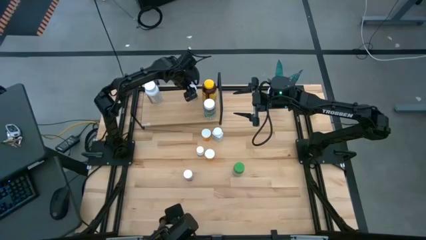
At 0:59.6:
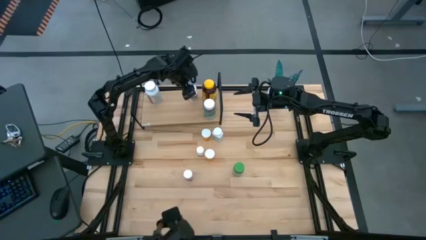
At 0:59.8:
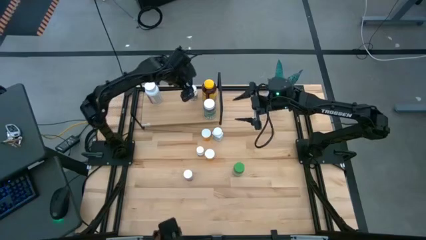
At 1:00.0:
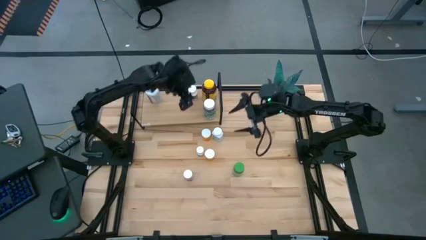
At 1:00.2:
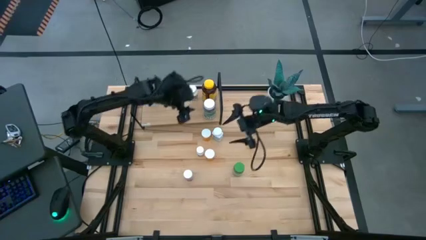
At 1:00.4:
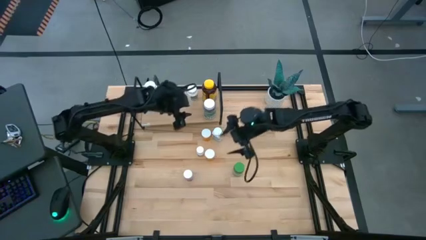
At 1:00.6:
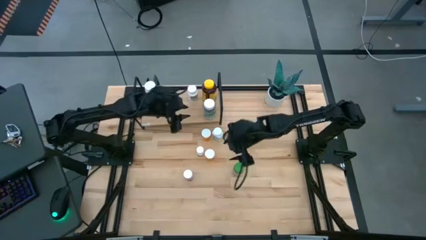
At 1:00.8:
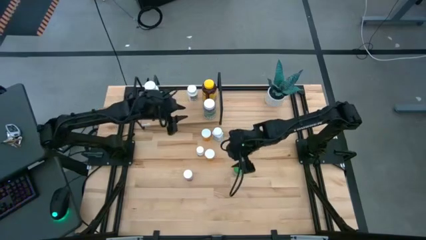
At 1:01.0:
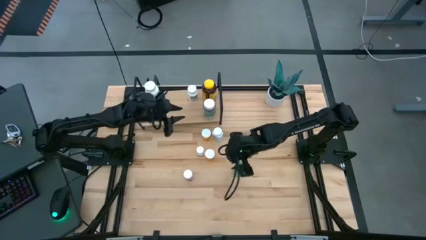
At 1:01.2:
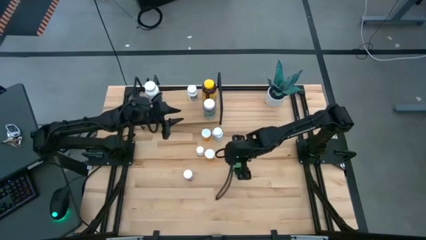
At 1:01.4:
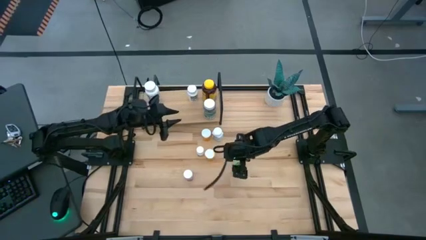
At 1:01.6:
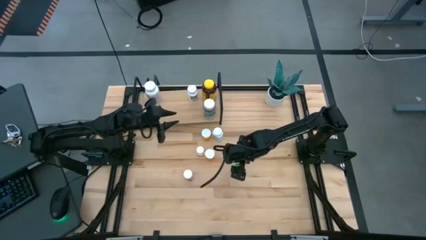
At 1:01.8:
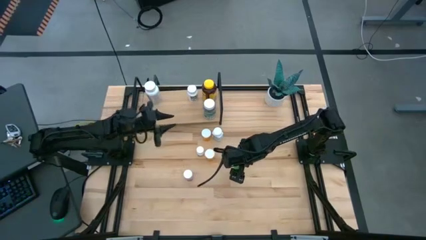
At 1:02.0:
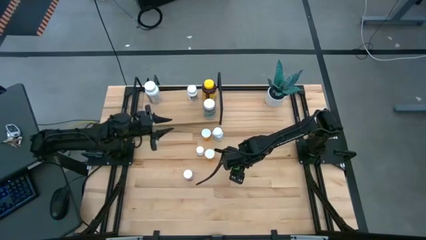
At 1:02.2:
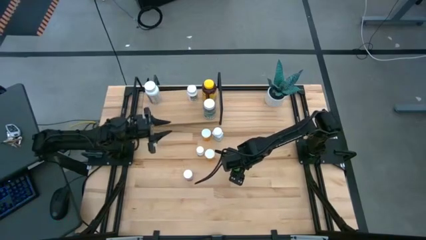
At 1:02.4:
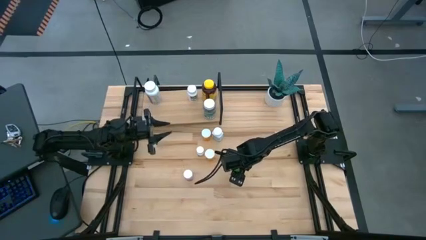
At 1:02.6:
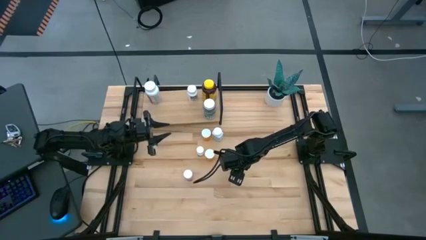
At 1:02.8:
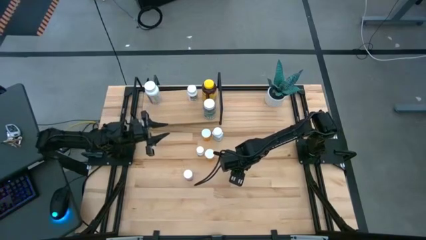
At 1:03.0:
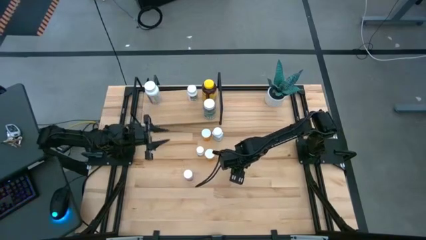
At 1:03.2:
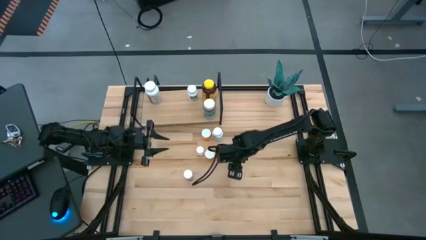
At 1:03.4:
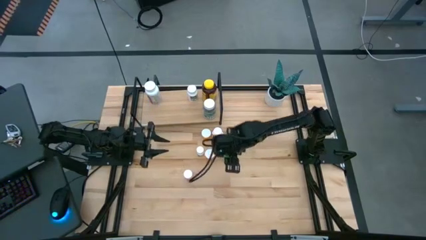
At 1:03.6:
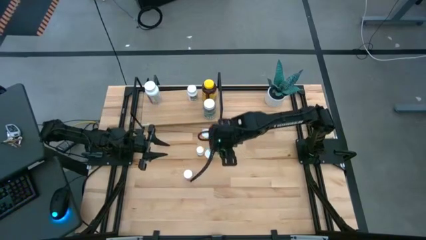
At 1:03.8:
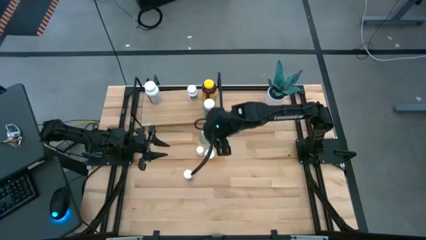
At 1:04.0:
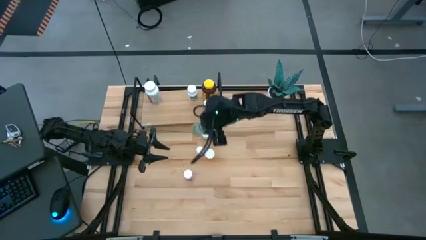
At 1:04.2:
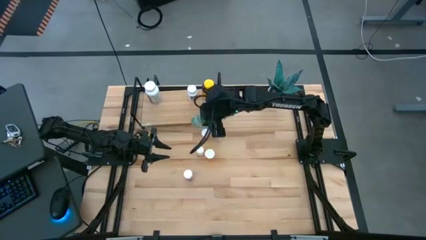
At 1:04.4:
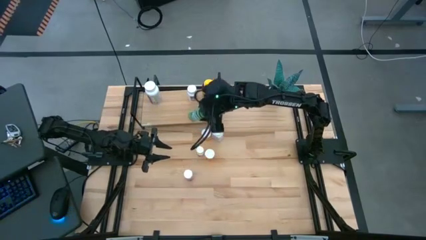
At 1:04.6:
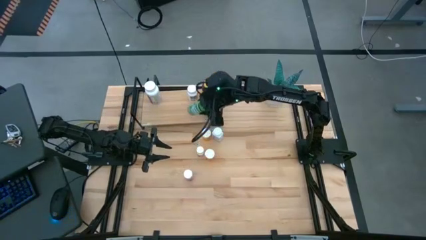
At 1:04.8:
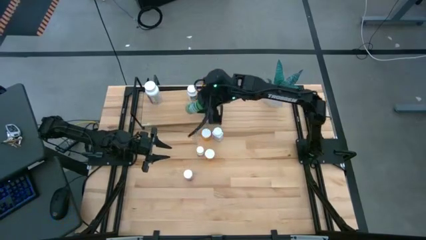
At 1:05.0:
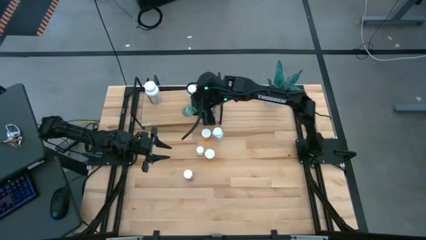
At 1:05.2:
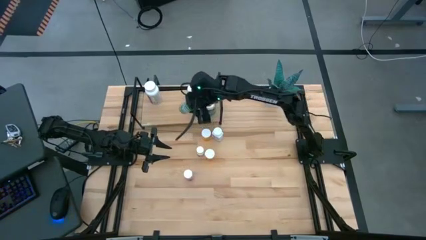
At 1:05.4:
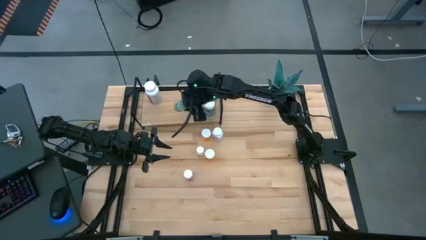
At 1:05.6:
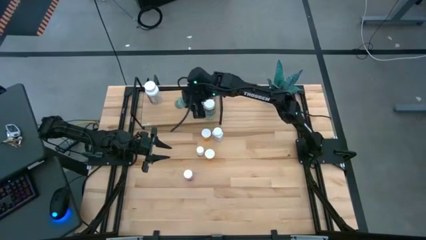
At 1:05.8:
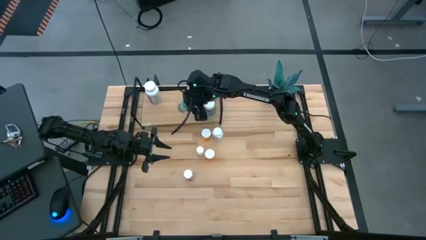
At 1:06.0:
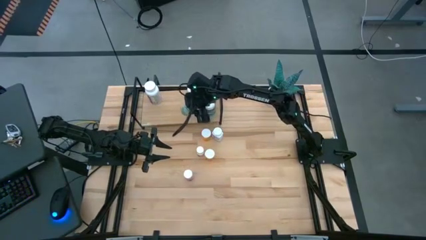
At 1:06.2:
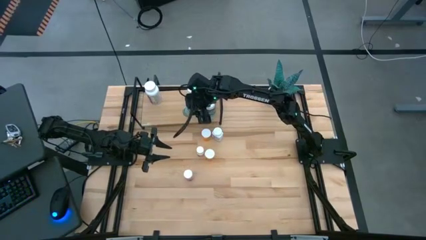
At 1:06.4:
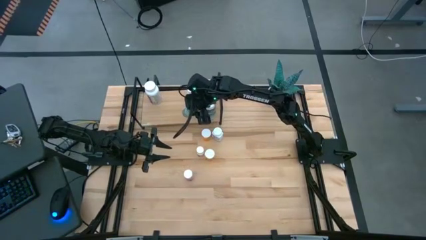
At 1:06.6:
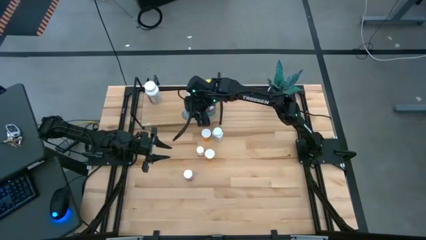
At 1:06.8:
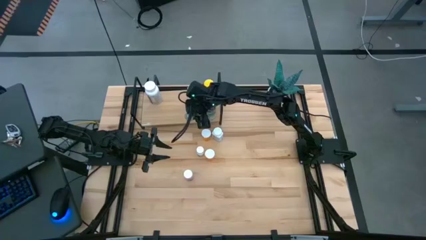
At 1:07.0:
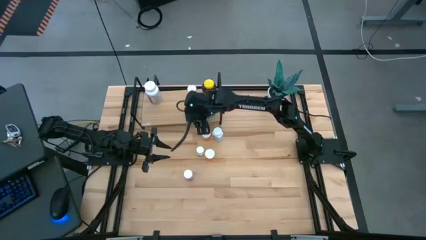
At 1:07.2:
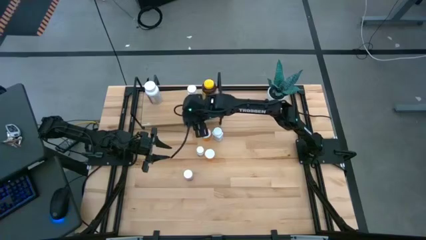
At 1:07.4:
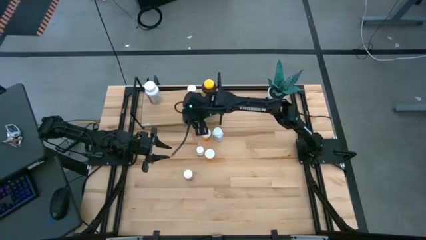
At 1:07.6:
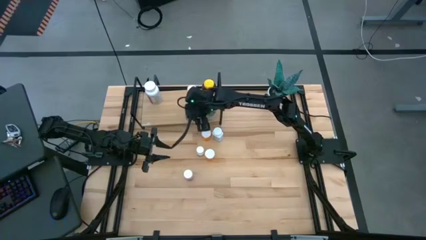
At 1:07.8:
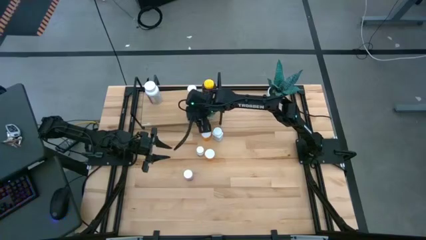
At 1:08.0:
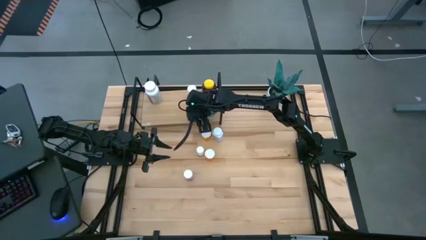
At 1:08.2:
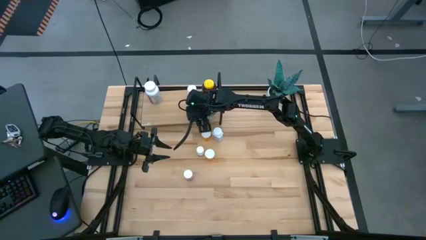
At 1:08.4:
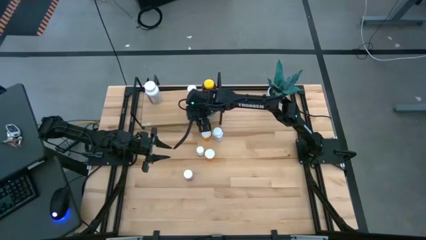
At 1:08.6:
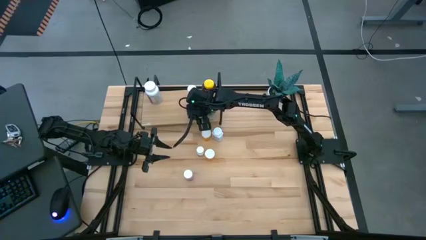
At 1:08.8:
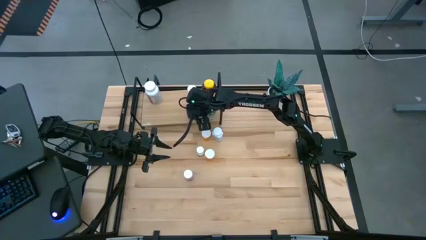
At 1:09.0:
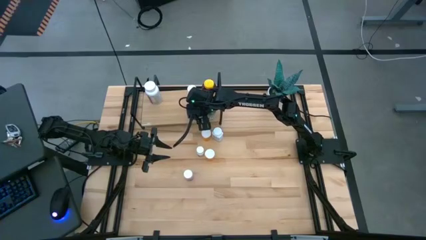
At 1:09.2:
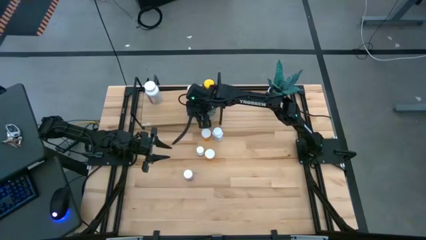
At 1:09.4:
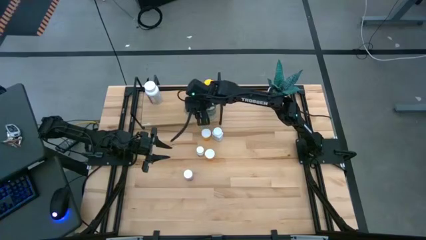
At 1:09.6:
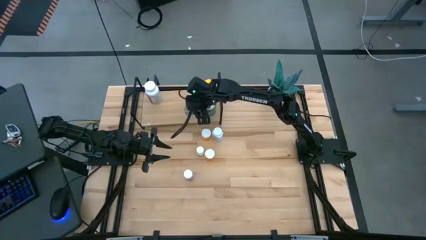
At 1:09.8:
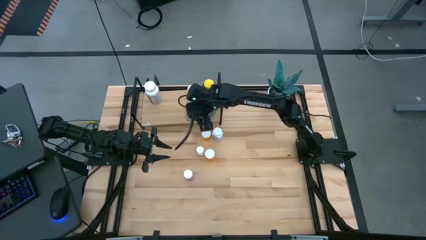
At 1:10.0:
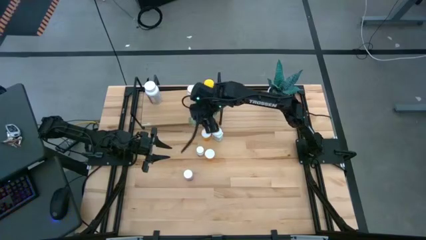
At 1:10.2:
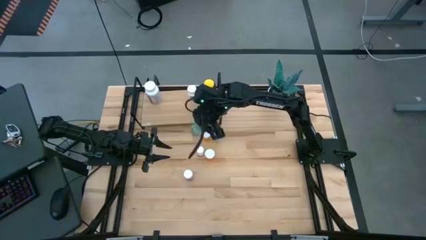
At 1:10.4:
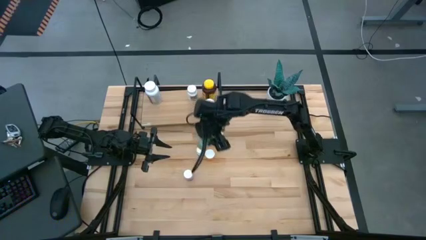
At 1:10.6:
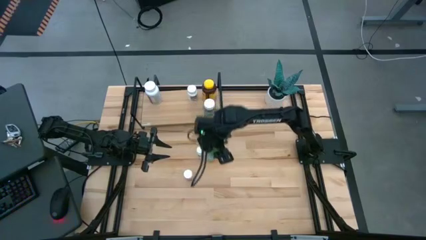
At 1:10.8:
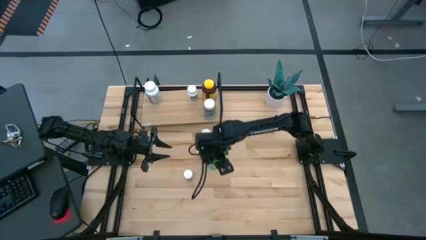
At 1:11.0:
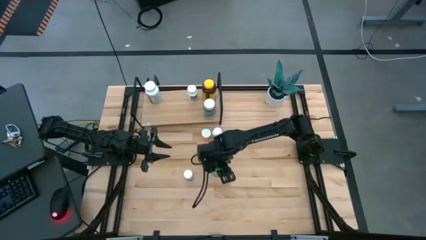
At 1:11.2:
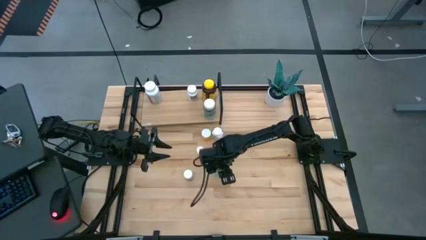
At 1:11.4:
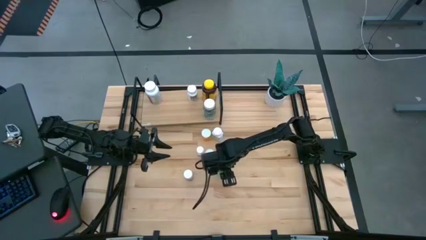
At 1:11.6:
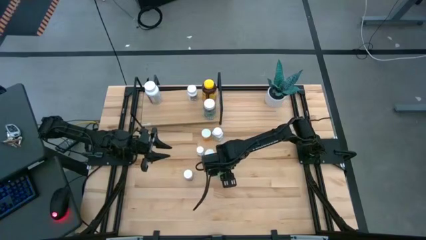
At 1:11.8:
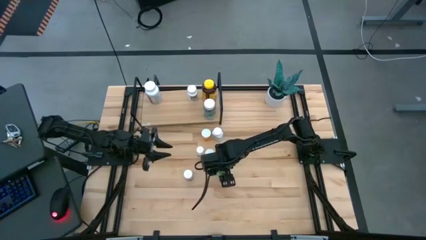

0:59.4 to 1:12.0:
Task: Pick and place medicine bottles onto shelf by color
Put the light green pill bottle on the shelf

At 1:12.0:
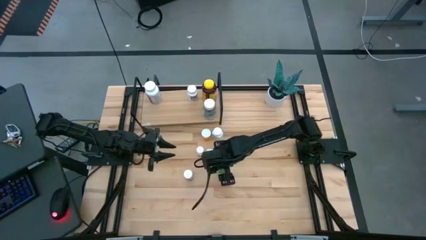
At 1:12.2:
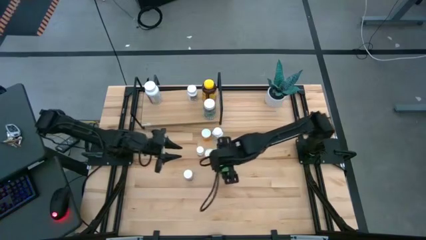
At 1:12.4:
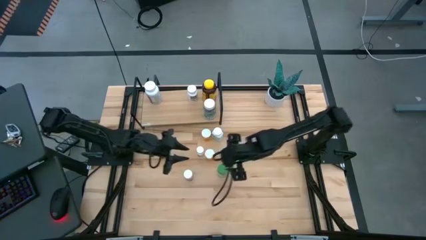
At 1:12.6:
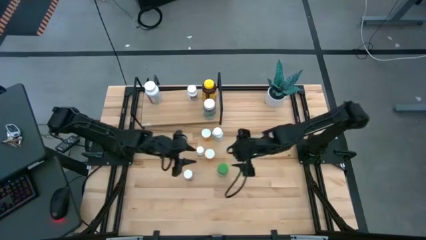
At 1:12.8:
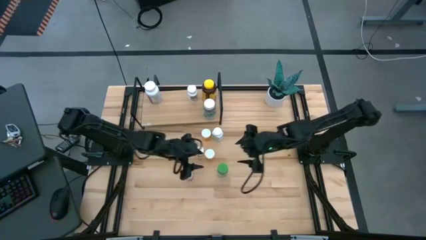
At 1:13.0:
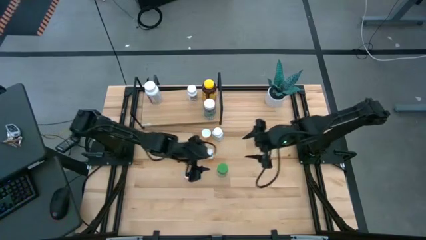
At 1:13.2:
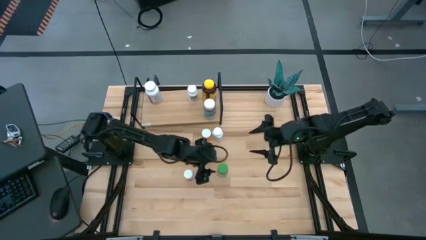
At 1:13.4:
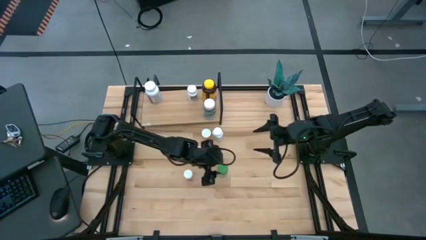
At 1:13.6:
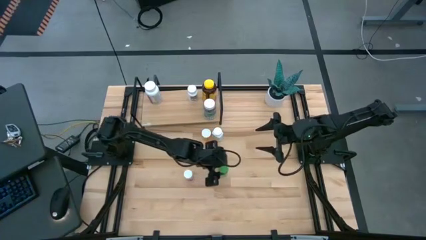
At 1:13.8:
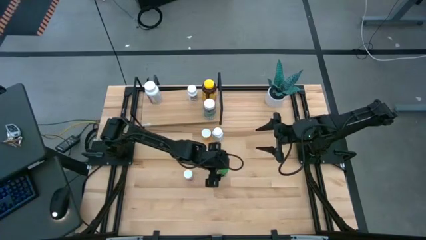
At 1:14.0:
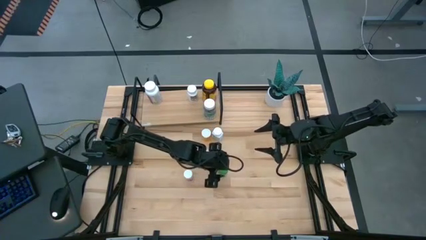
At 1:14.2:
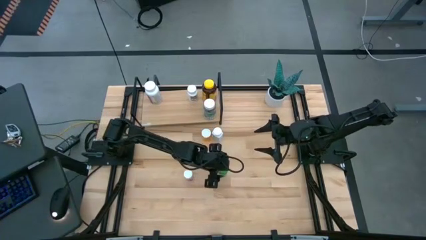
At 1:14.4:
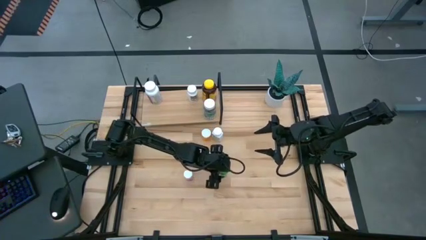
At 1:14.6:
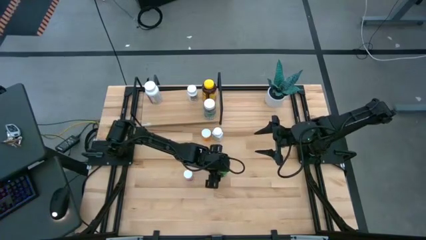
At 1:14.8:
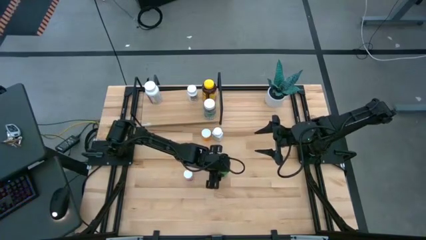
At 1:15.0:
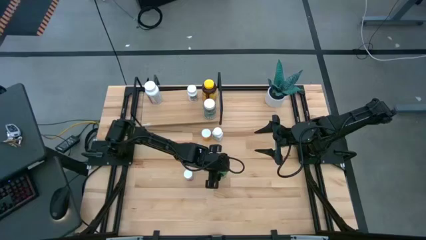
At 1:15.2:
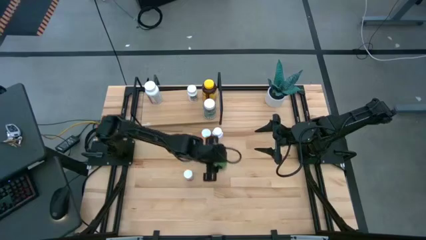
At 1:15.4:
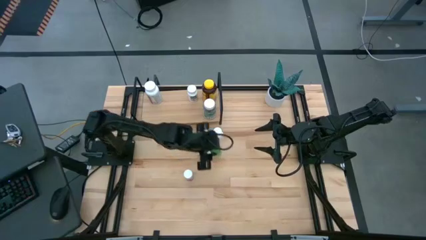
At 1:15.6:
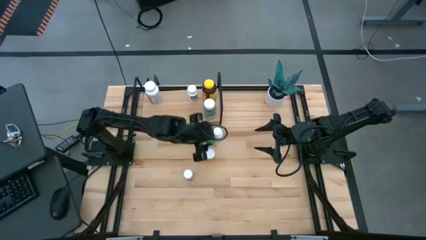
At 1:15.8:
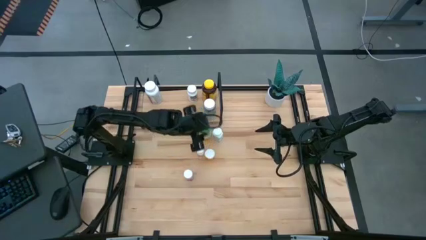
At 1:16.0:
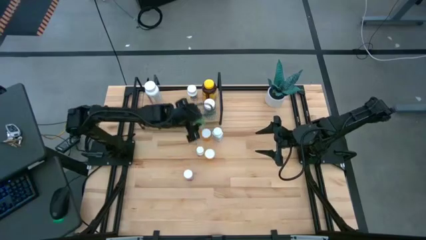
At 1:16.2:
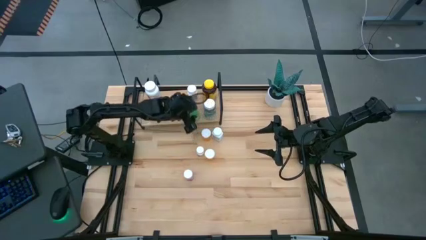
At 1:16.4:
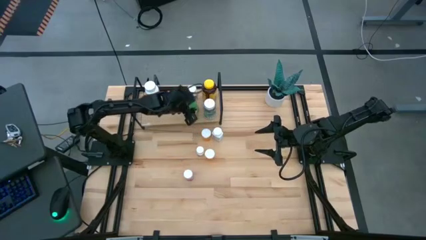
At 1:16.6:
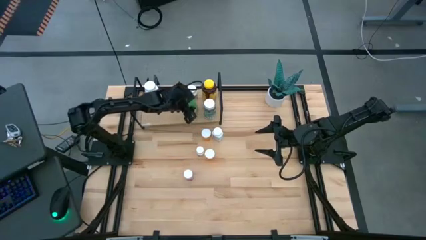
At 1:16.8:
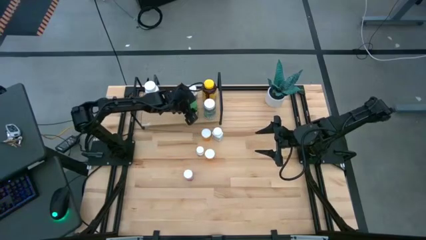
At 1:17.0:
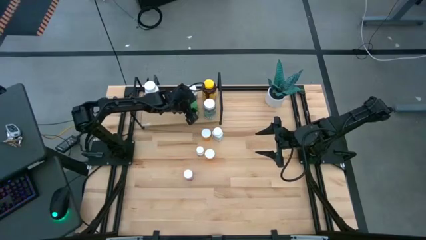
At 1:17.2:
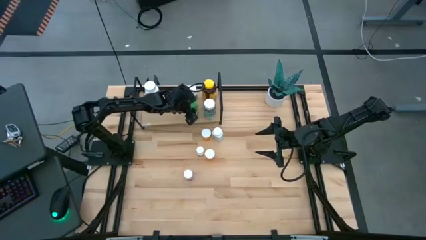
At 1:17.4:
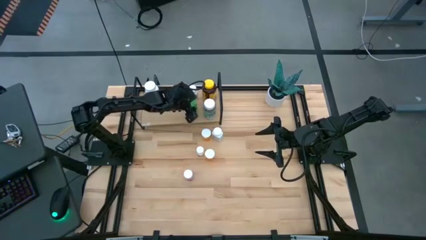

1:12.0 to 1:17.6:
Put the light green pill bottle on the shelf
